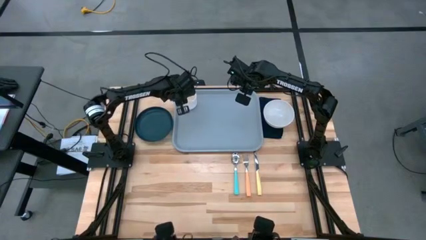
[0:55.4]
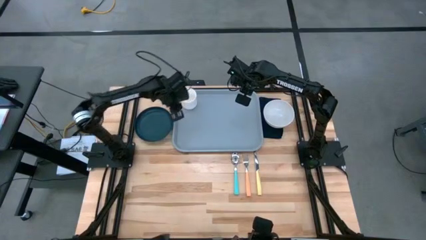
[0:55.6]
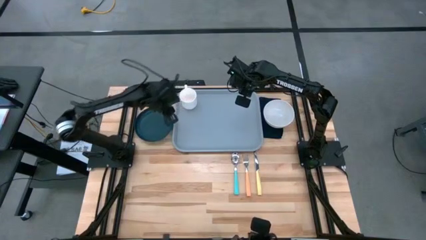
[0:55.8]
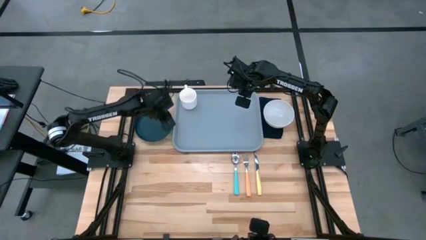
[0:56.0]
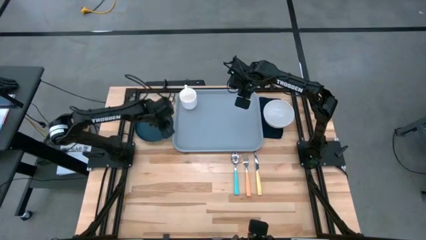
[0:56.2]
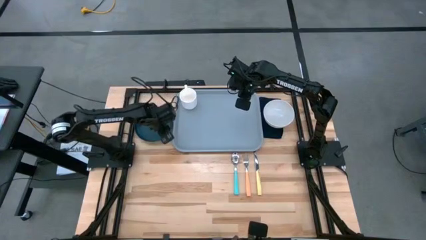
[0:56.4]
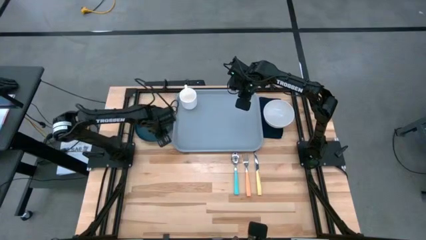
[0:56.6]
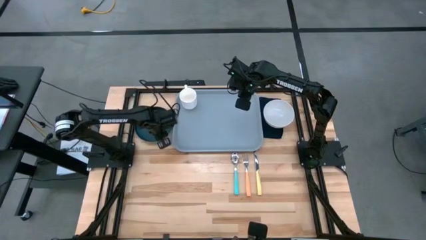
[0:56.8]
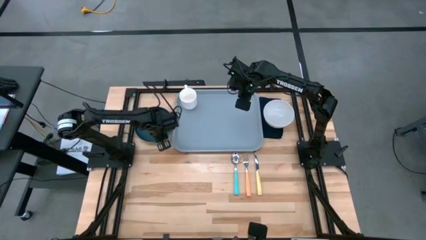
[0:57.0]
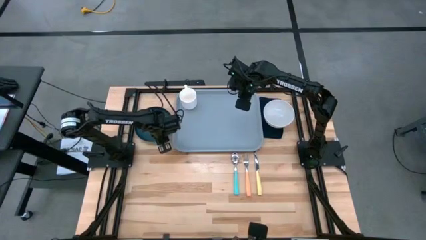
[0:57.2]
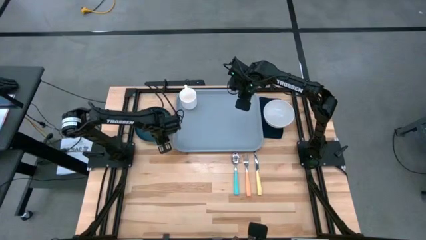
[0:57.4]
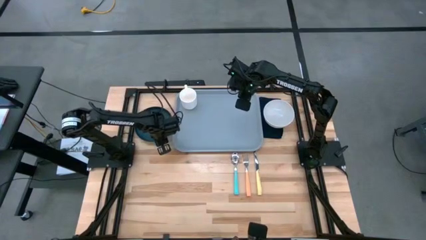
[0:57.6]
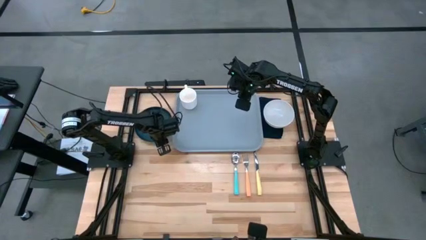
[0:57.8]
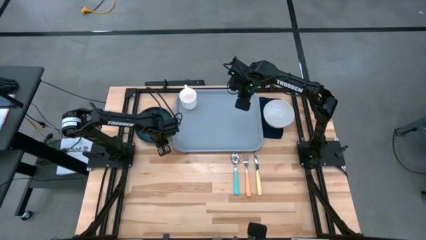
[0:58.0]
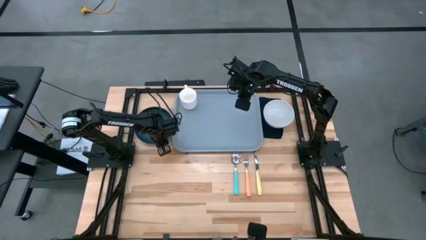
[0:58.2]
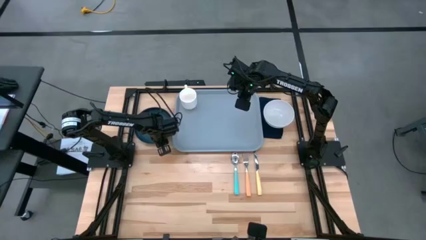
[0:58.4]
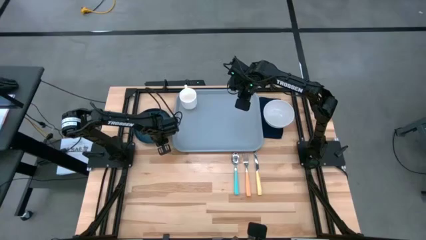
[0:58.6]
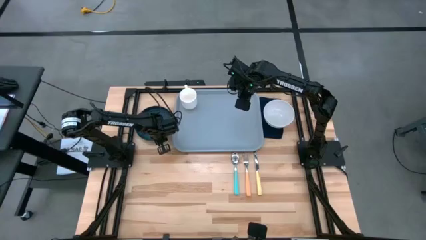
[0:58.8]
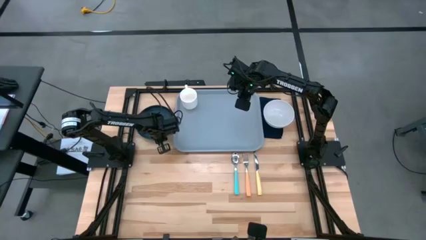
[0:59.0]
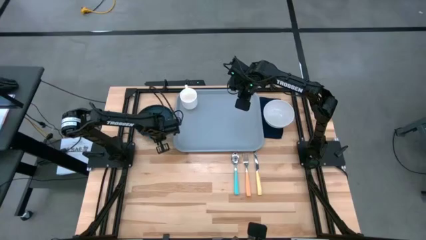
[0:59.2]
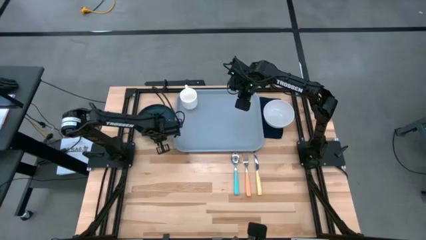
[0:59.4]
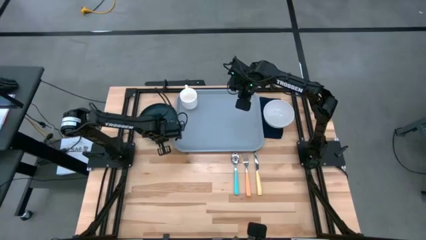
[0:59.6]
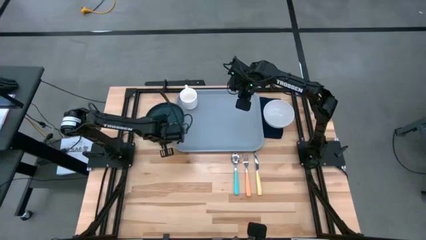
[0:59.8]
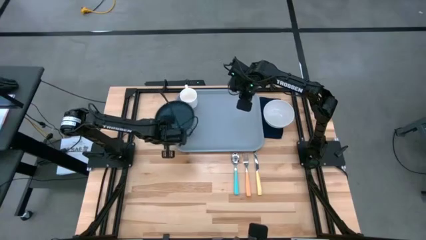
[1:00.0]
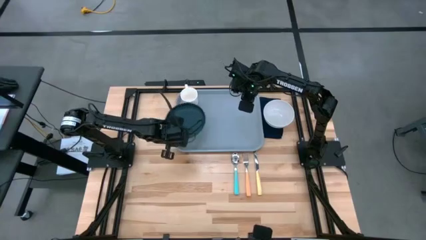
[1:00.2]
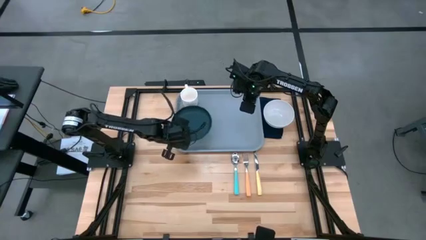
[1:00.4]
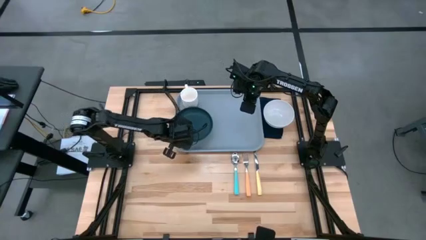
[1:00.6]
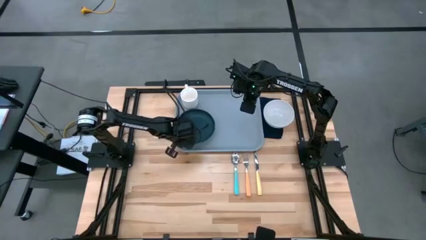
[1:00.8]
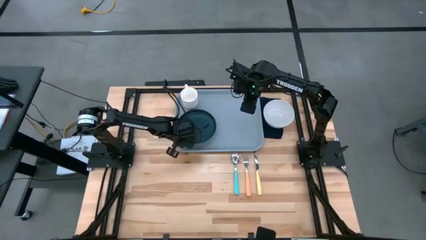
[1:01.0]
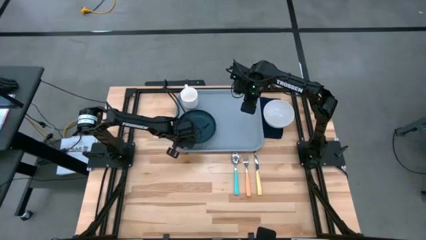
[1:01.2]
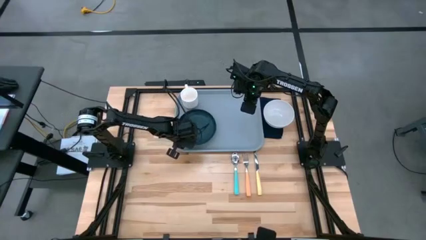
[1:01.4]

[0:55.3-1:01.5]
Task: Set up tray
Put the green plate on the gray tray

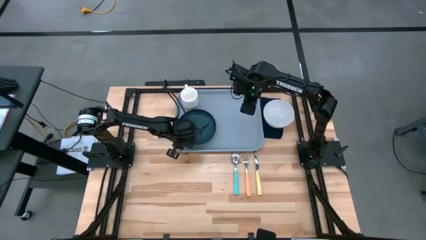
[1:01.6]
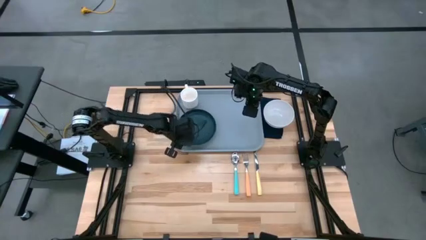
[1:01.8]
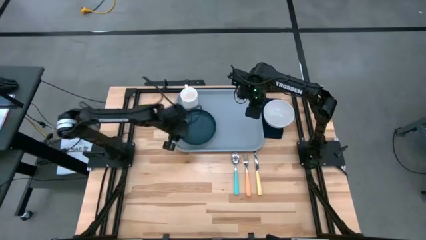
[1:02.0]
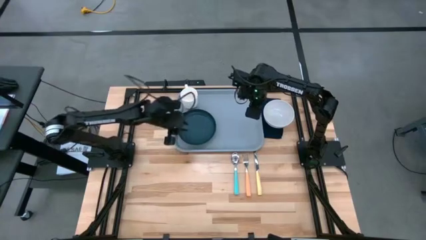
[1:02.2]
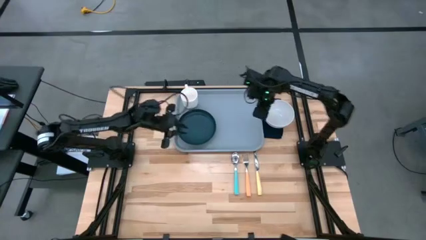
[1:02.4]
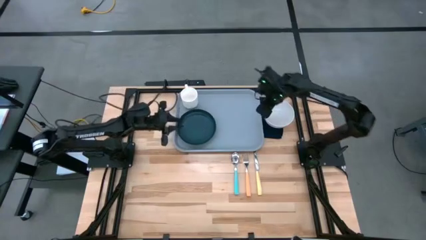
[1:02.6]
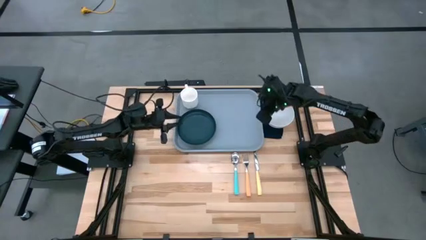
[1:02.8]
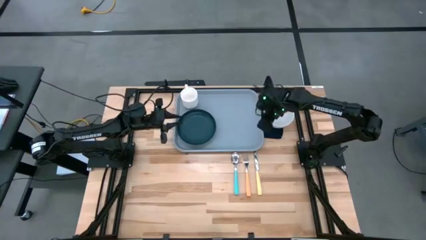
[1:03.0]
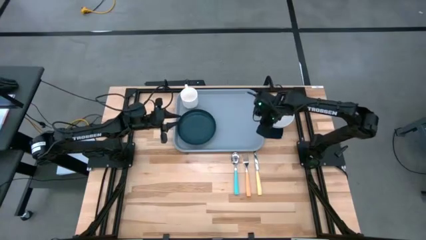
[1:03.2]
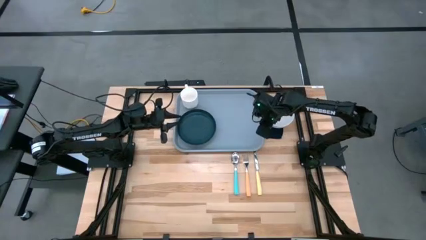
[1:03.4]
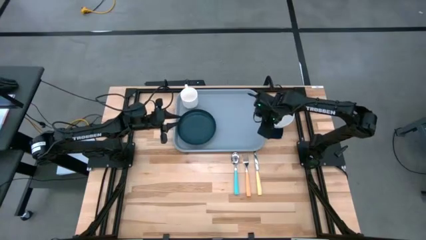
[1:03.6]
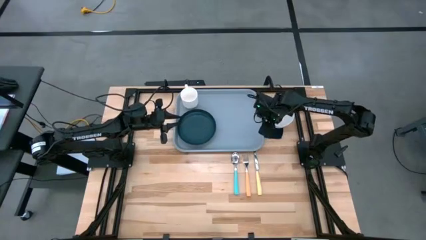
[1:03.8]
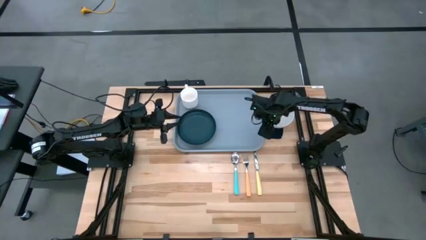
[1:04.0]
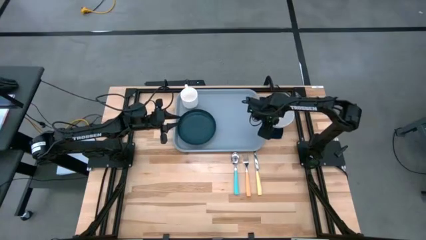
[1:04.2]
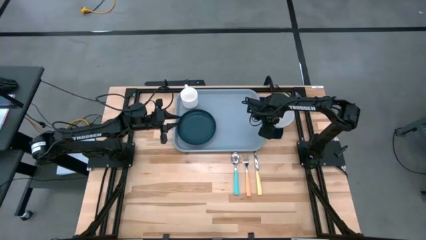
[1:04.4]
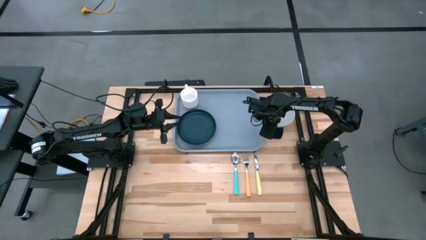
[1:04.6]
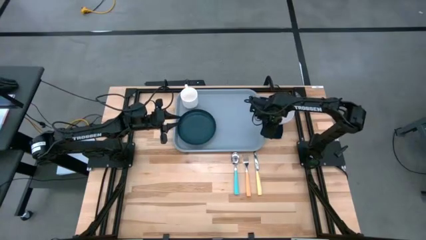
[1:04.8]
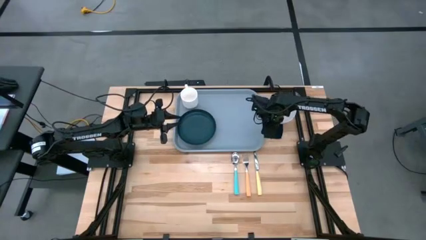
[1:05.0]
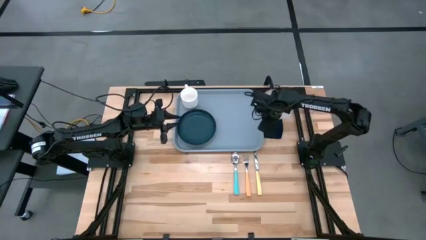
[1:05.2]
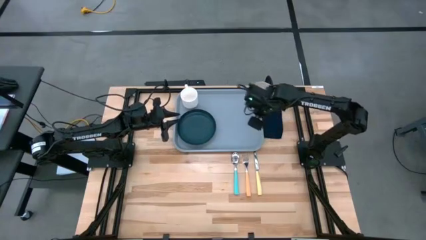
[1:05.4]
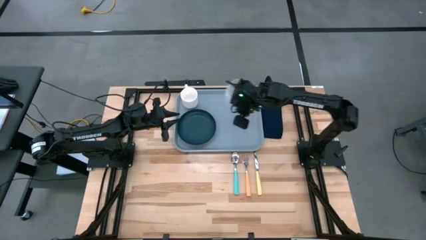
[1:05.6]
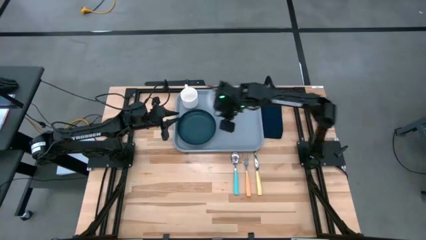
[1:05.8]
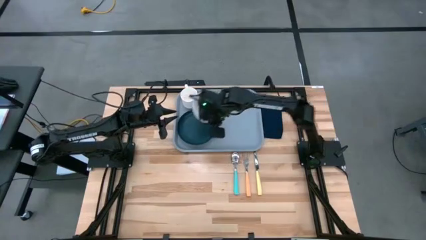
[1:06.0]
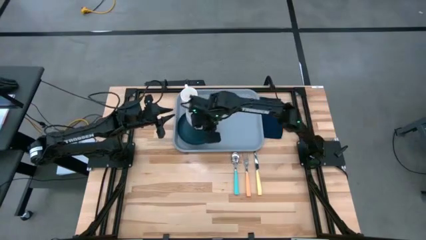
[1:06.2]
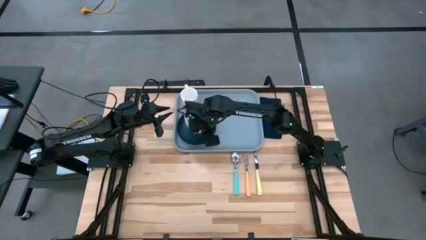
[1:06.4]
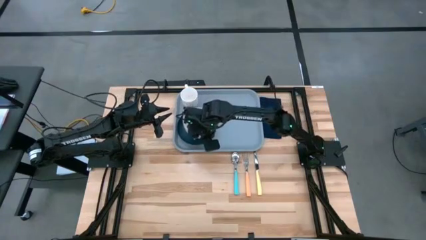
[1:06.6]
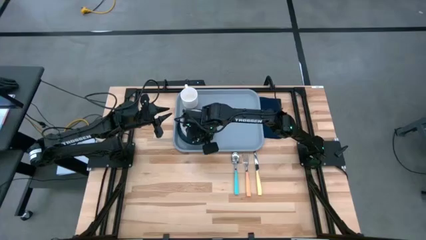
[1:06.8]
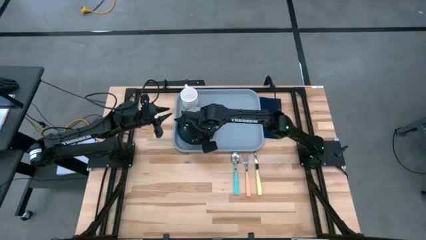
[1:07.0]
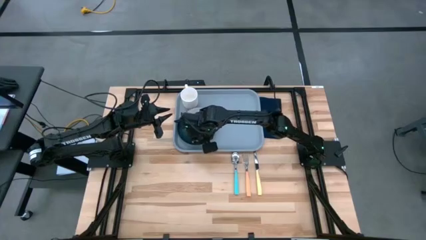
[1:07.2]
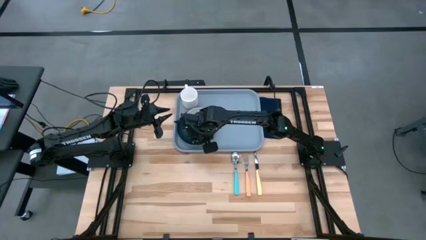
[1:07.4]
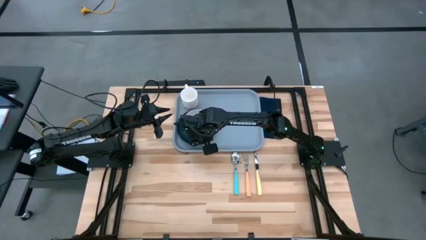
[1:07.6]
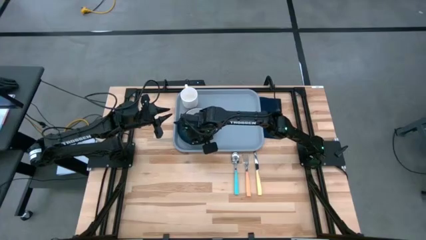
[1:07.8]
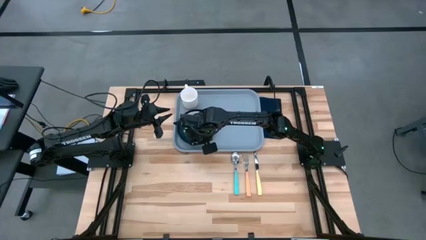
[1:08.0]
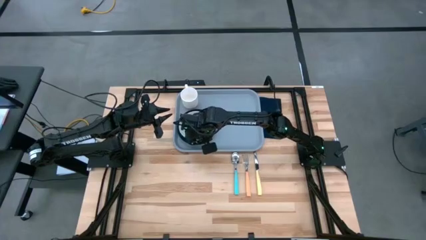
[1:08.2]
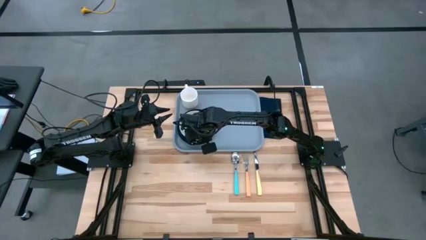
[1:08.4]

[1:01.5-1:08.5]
Put the white bowl on top of the green plate
